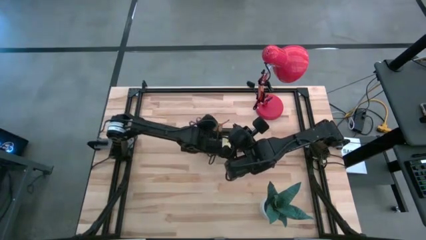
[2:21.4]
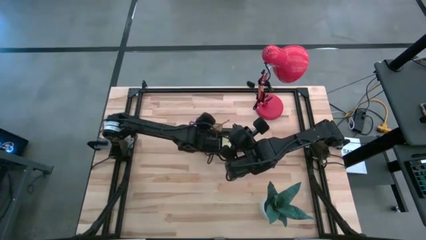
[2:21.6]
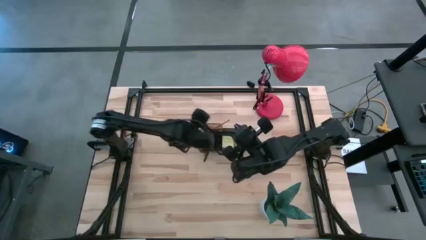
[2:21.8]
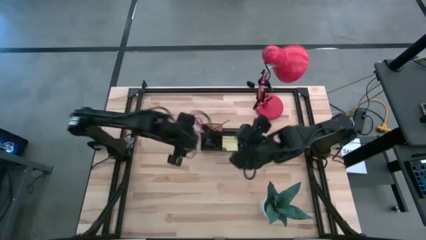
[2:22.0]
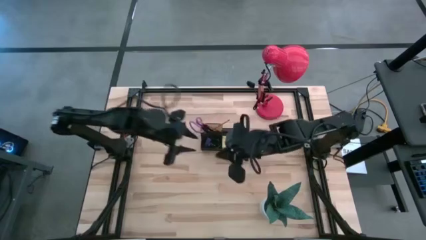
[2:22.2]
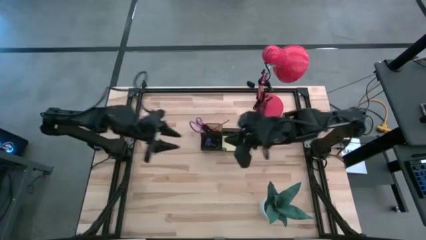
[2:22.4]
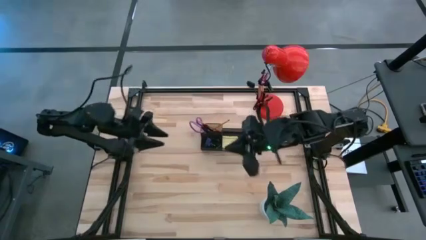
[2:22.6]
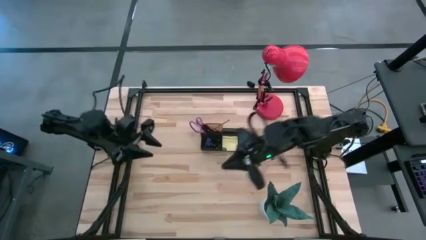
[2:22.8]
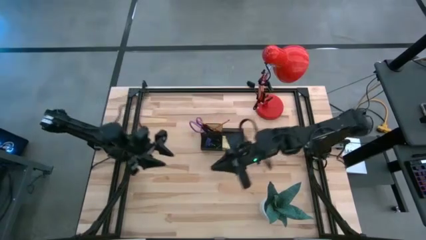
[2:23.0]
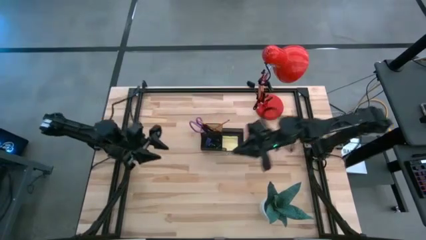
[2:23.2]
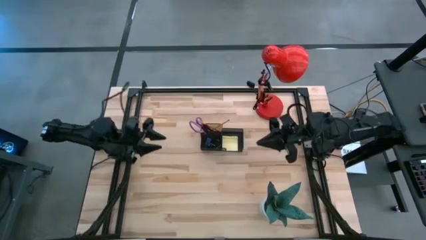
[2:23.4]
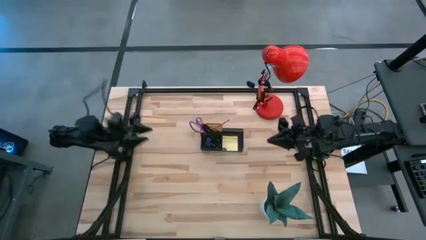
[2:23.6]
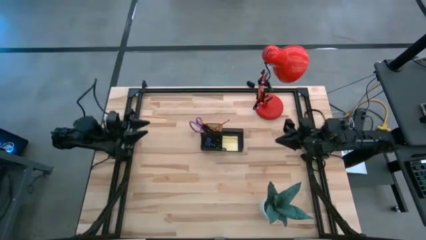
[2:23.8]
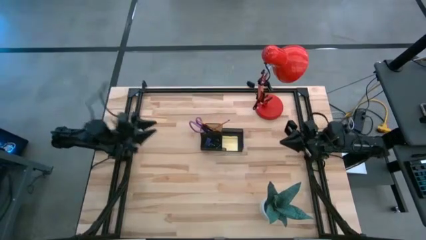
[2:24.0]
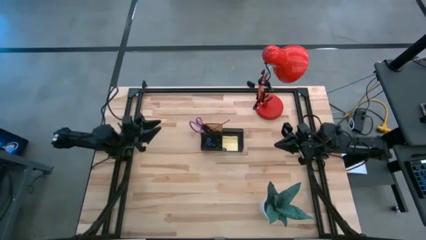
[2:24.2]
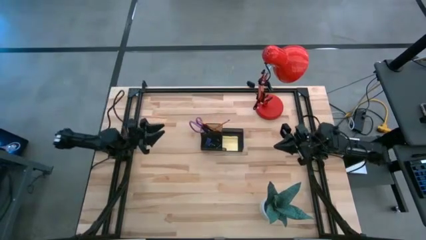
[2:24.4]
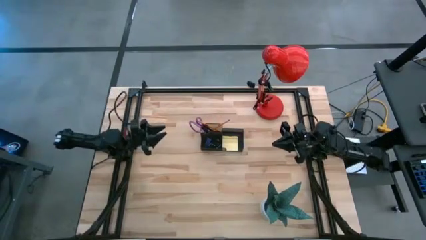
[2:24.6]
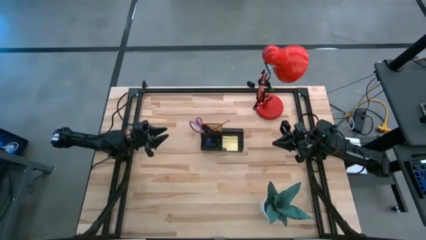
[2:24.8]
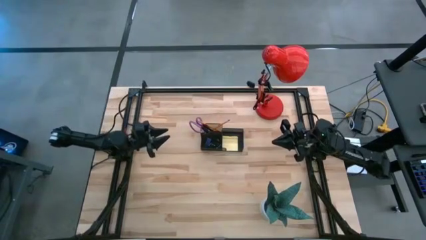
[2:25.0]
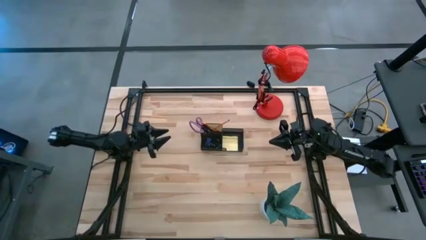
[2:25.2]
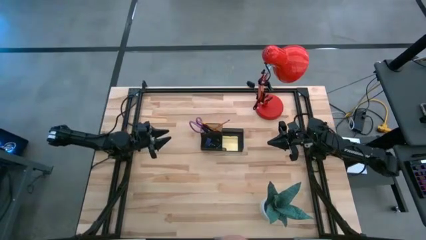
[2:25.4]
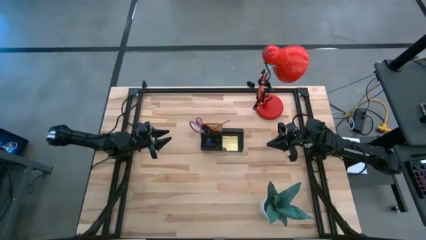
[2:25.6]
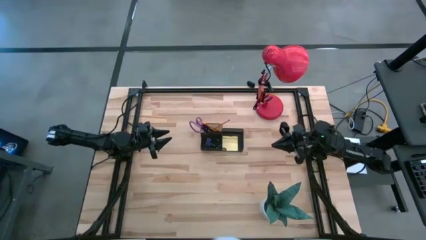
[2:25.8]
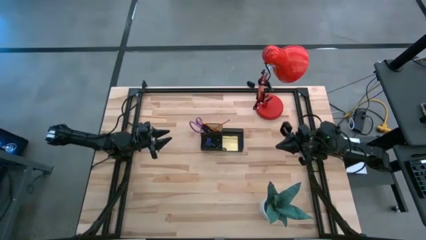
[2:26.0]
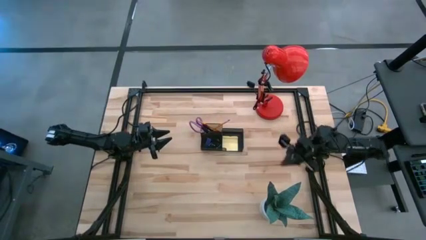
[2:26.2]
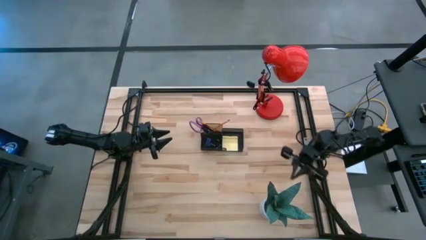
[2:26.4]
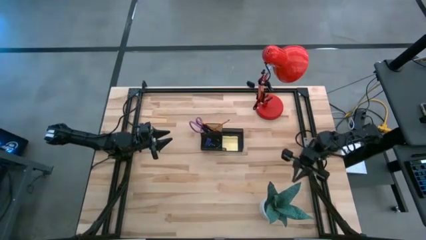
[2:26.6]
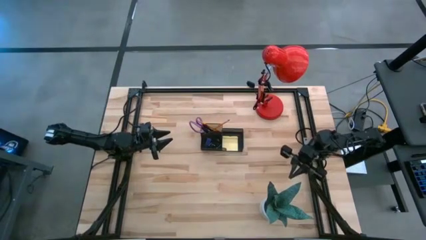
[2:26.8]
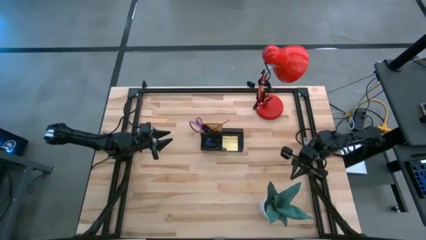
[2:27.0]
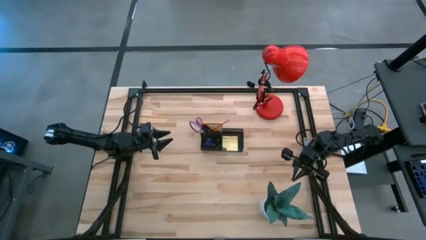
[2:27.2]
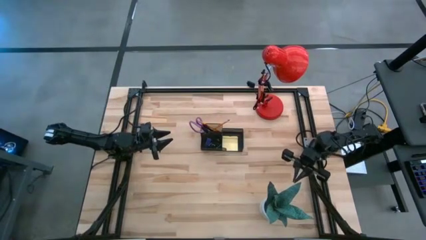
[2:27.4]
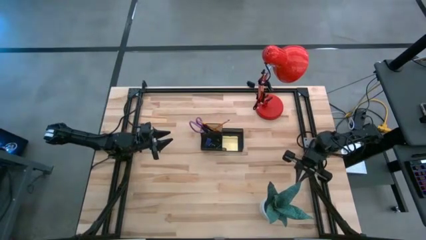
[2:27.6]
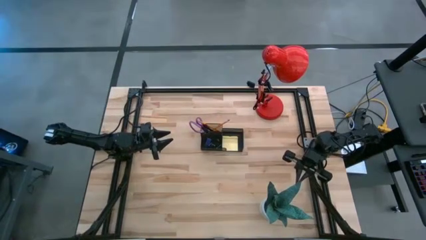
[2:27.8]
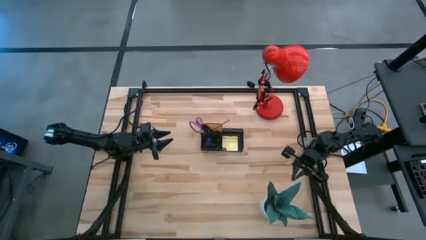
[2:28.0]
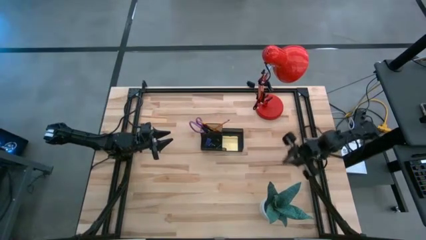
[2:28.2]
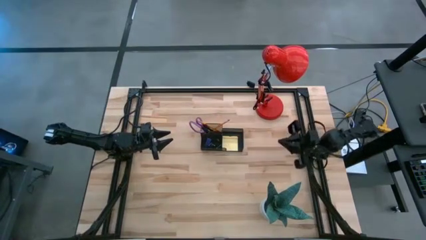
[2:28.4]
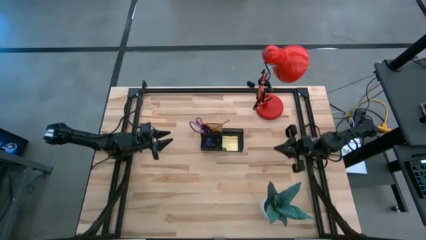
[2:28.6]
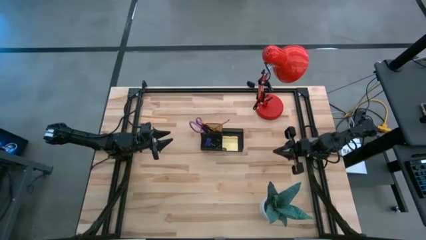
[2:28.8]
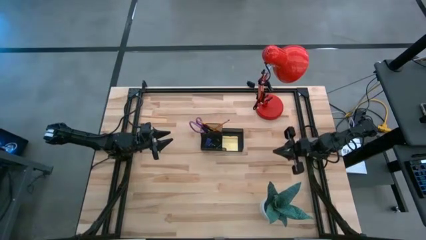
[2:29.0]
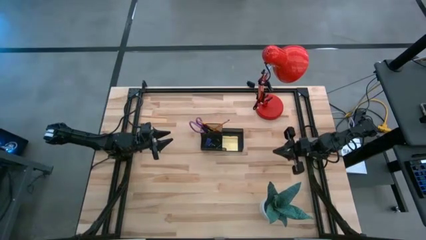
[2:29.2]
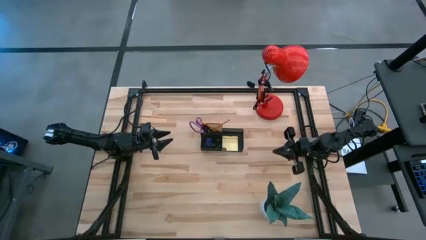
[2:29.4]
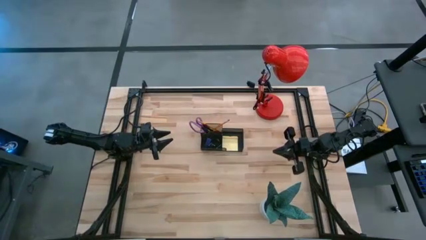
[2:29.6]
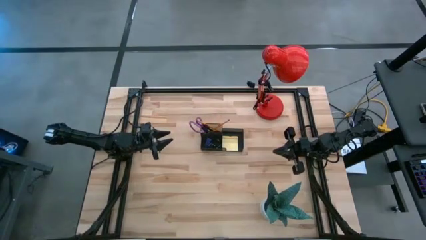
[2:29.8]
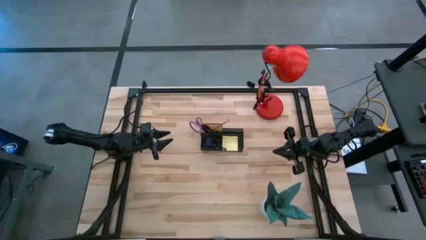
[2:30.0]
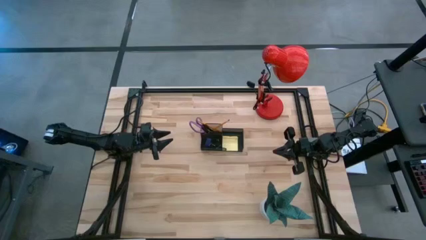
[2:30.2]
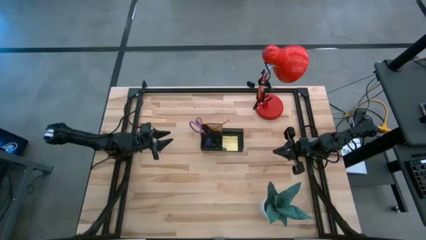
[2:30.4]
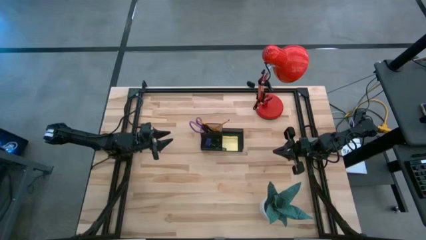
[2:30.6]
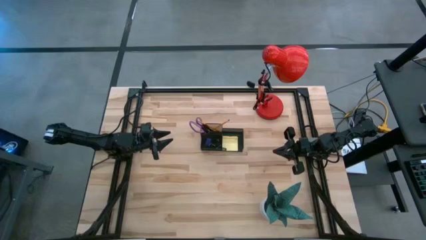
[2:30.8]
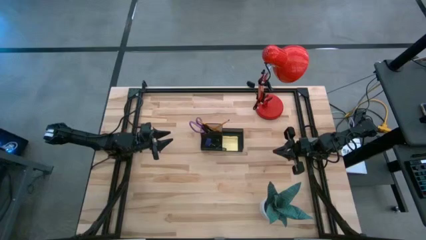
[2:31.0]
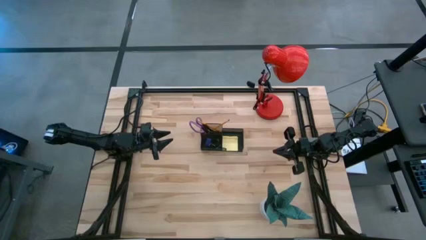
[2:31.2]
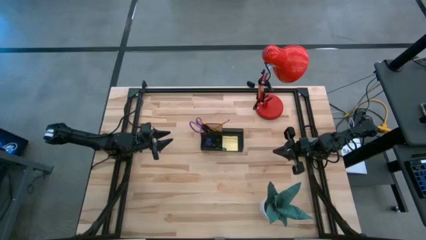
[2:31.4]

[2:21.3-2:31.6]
Task: Pick and place office supplies into organizer
Return to Home Position

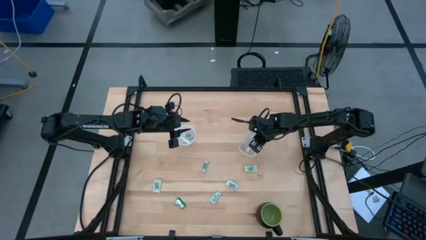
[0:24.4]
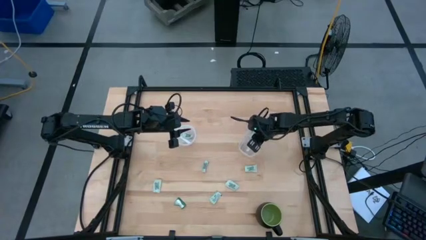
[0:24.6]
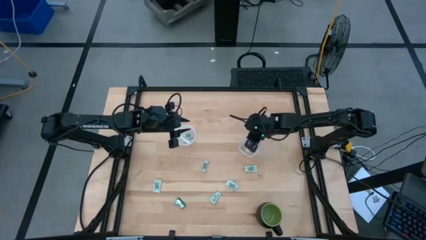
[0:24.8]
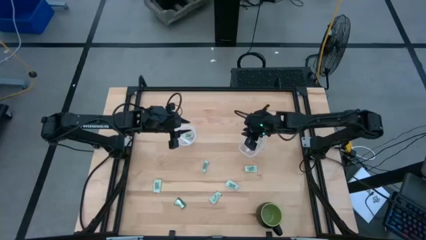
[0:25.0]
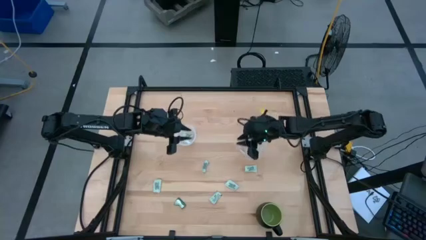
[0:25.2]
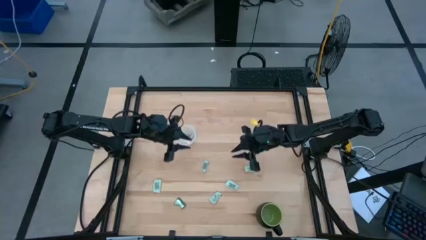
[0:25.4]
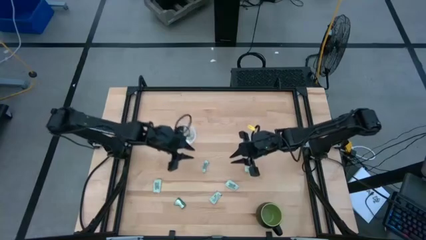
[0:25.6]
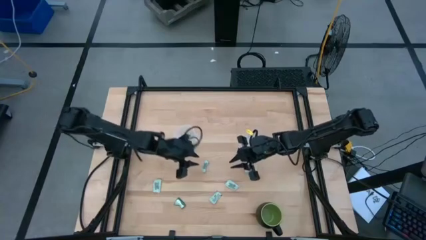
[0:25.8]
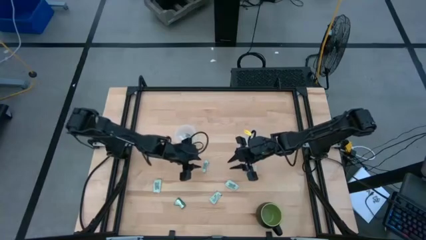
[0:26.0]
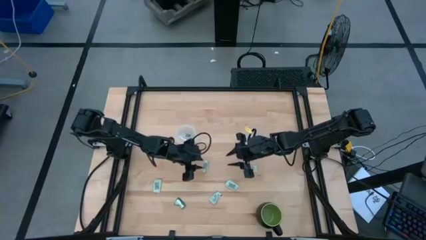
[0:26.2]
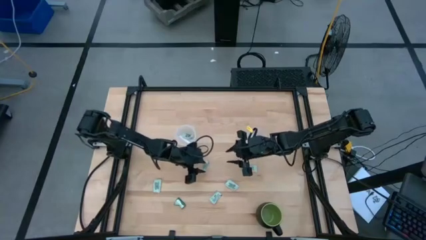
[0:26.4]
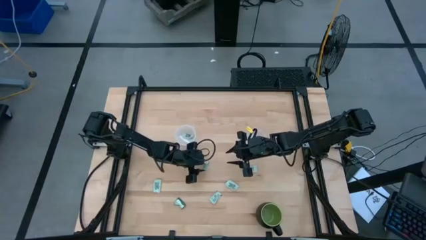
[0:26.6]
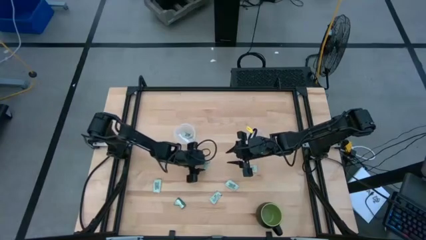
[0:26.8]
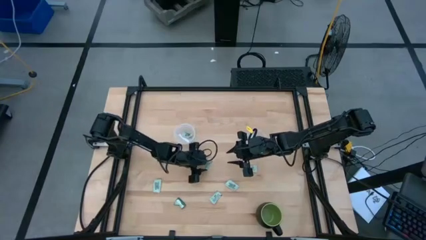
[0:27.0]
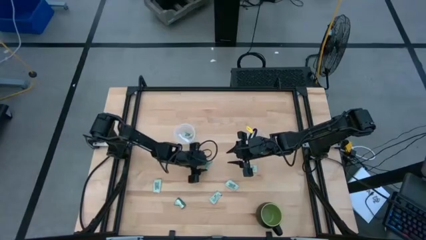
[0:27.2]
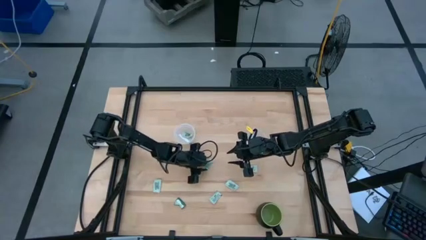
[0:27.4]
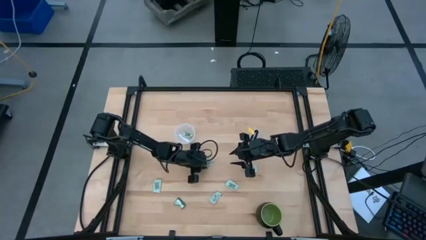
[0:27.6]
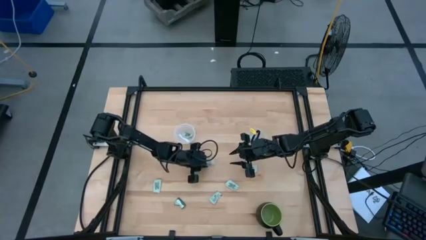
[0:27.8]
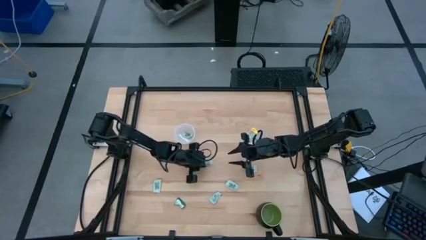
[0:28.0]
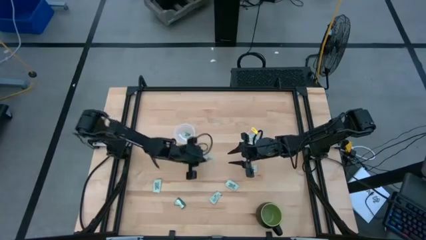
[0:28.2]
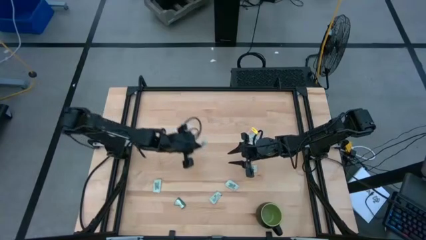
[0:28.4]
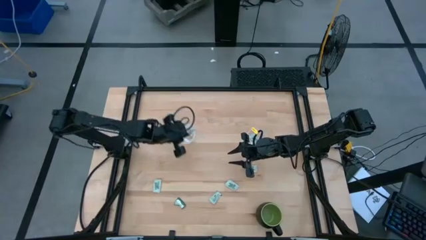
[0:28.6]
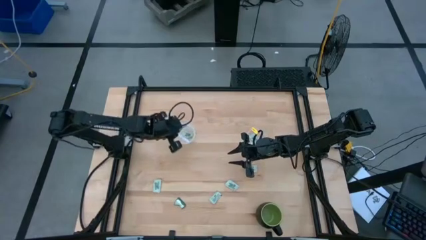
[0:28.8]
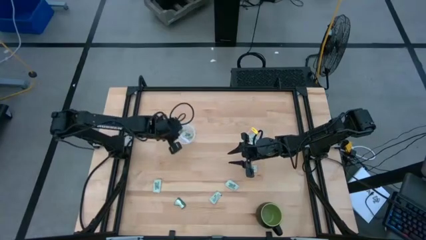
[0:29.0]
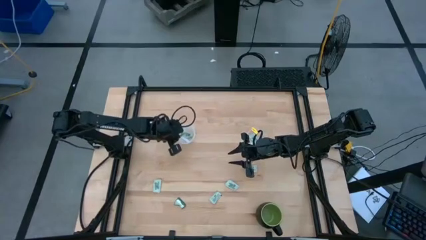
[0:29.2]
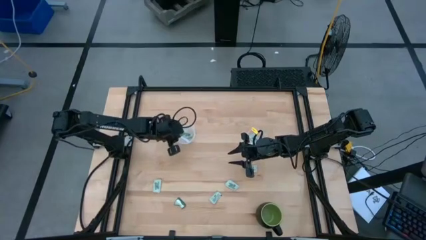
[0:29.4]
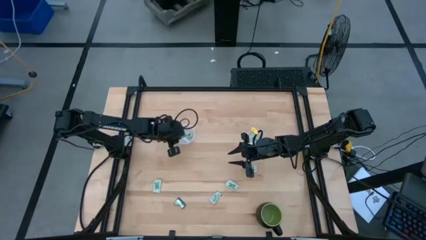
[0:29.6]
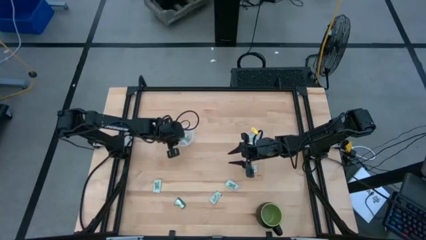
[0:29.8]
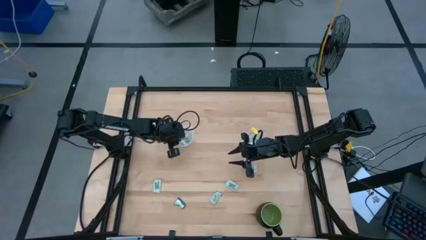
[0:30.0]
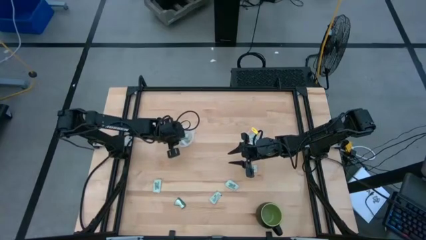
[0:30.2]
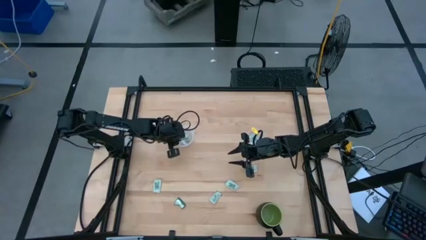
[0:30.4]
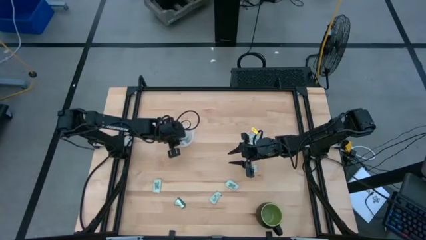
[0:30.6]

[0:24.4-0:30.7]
Task: Pick and place Stevia / Truvia into bins
Put the white stevia packet into the left transparent container
